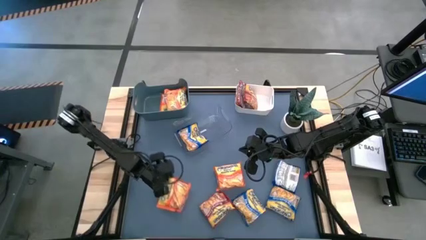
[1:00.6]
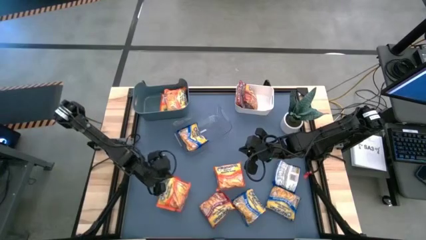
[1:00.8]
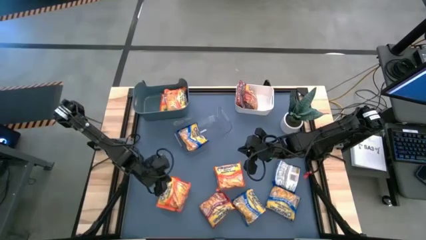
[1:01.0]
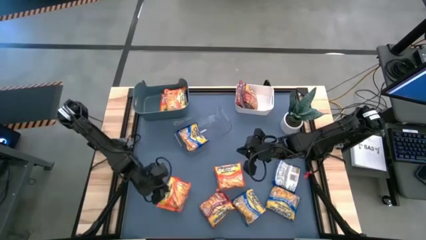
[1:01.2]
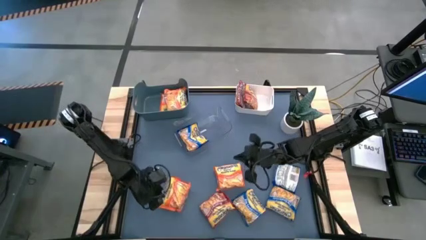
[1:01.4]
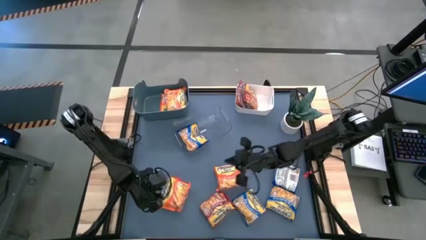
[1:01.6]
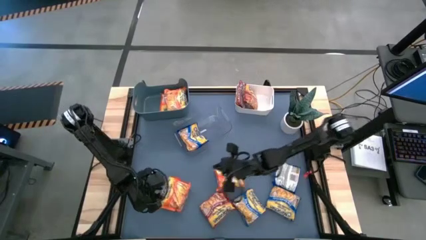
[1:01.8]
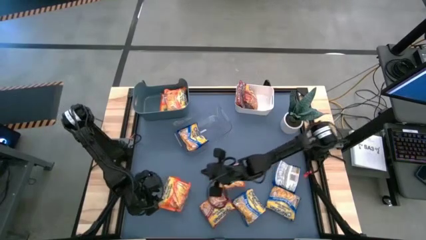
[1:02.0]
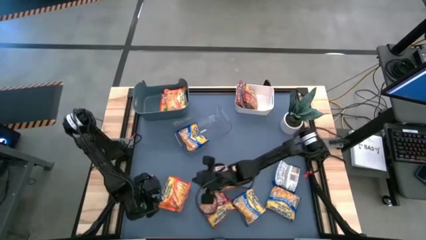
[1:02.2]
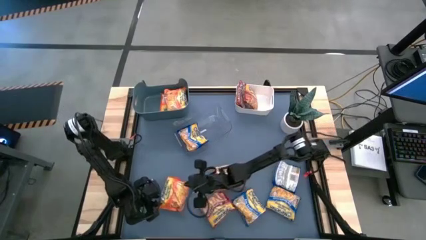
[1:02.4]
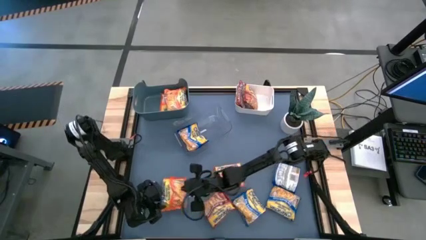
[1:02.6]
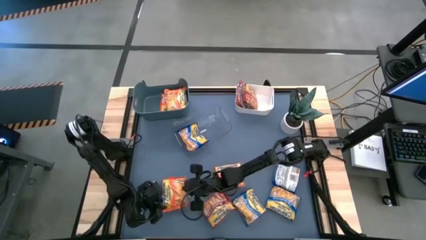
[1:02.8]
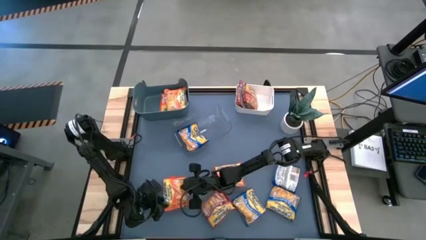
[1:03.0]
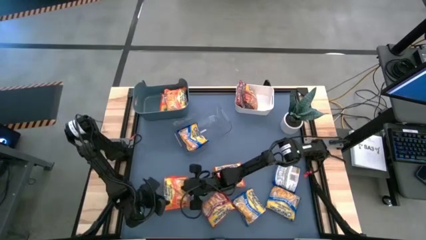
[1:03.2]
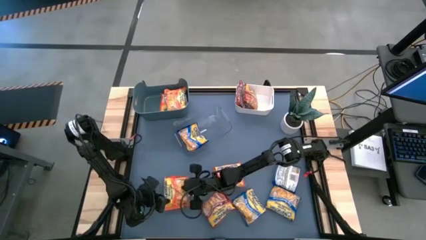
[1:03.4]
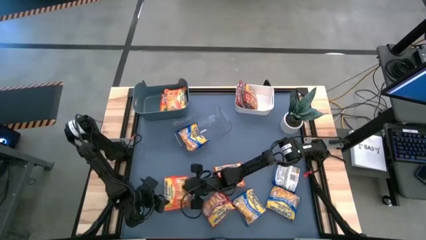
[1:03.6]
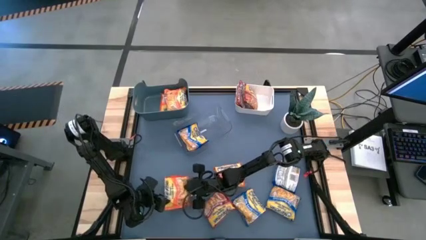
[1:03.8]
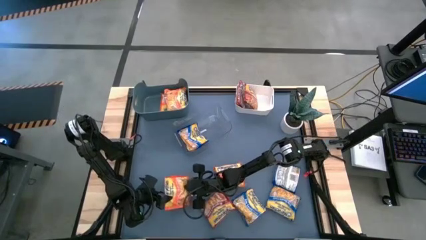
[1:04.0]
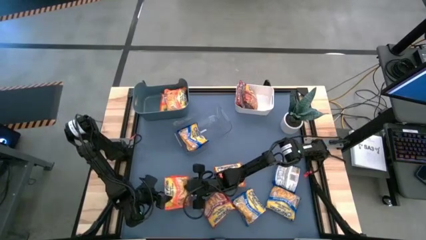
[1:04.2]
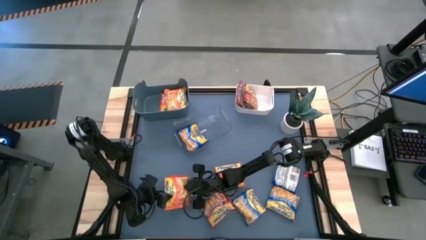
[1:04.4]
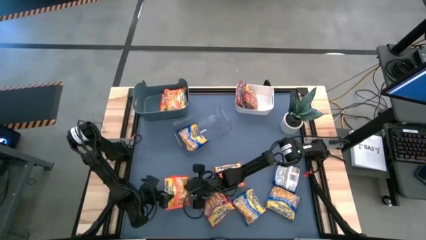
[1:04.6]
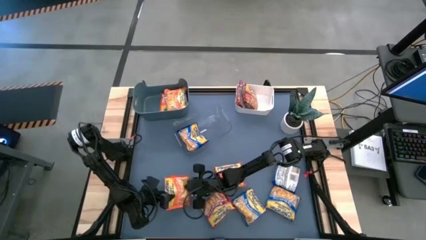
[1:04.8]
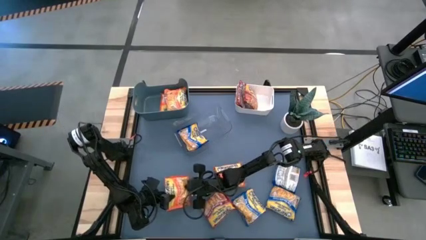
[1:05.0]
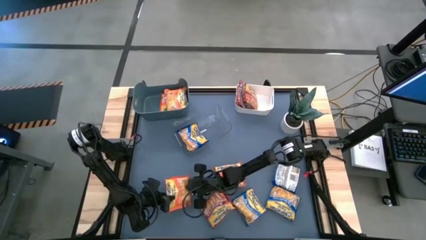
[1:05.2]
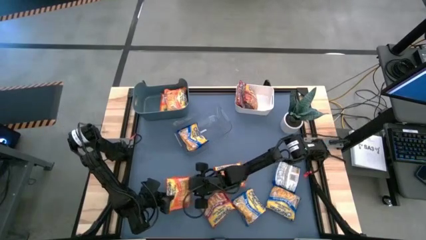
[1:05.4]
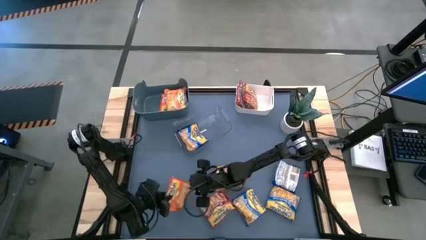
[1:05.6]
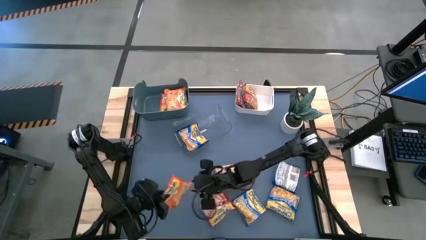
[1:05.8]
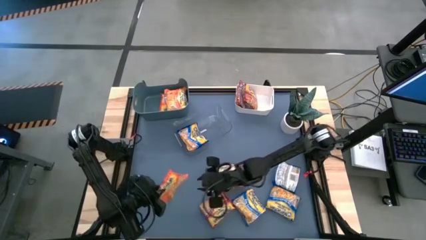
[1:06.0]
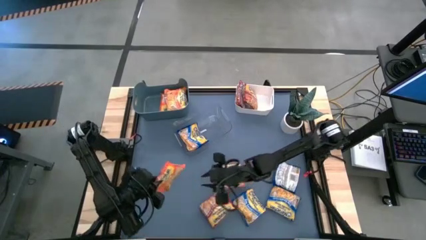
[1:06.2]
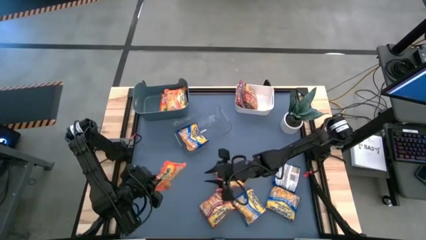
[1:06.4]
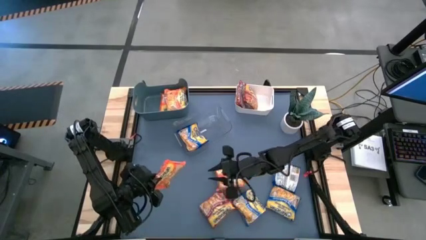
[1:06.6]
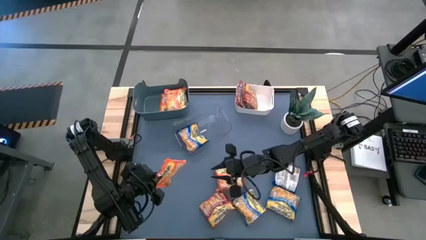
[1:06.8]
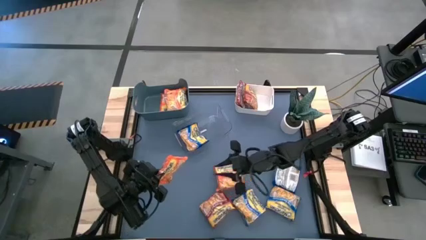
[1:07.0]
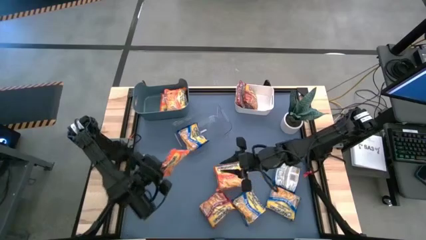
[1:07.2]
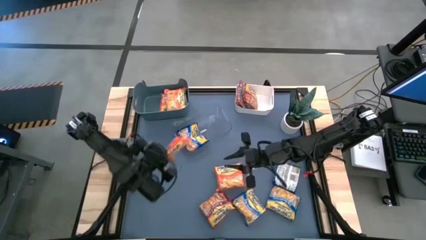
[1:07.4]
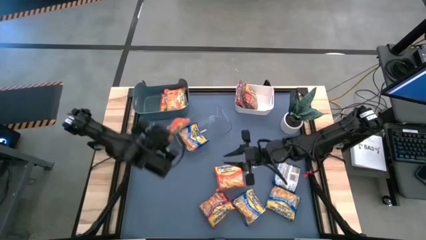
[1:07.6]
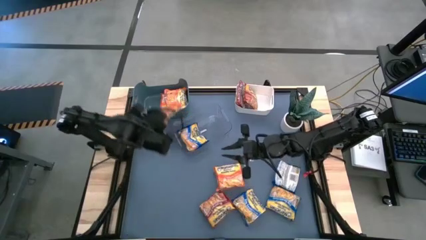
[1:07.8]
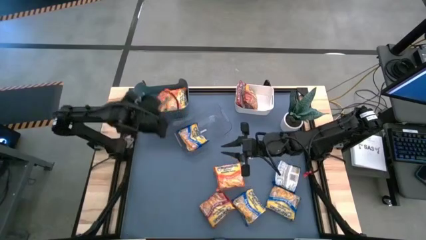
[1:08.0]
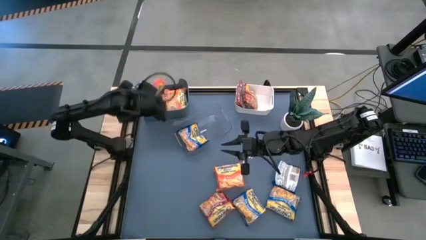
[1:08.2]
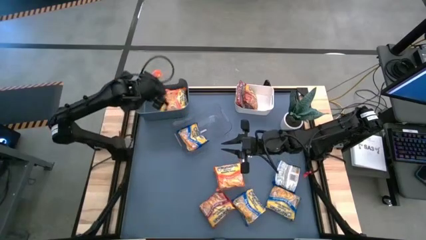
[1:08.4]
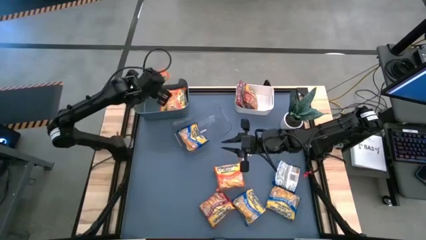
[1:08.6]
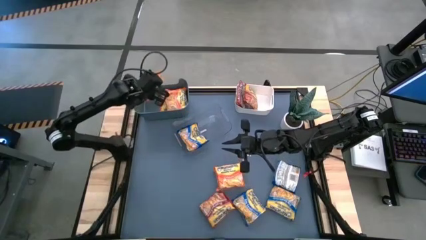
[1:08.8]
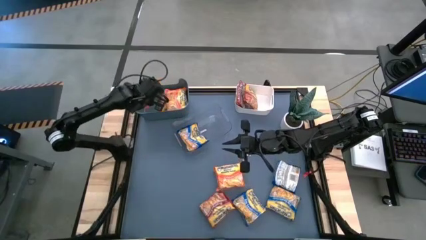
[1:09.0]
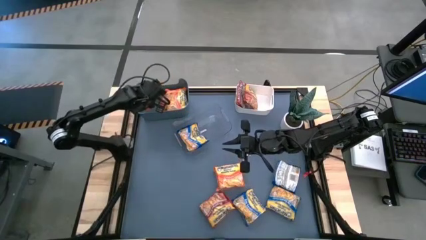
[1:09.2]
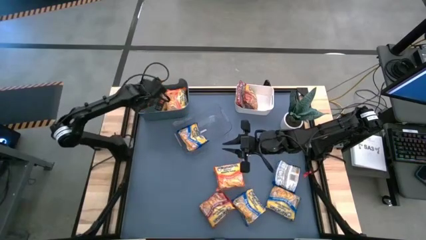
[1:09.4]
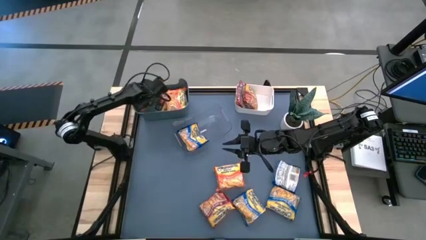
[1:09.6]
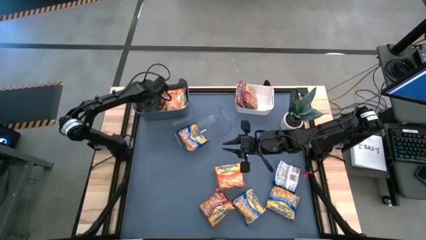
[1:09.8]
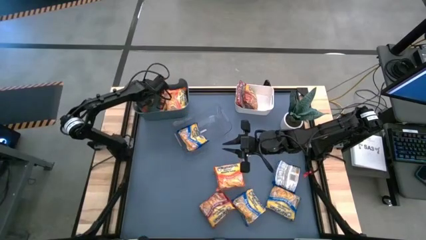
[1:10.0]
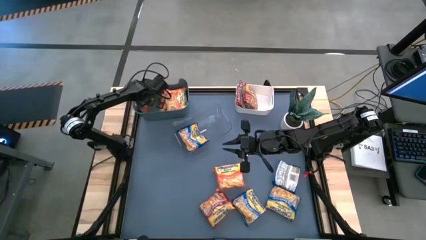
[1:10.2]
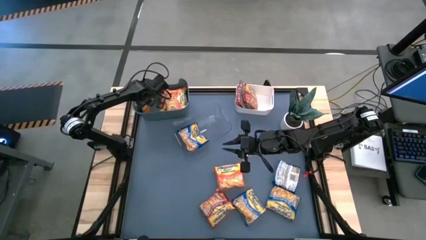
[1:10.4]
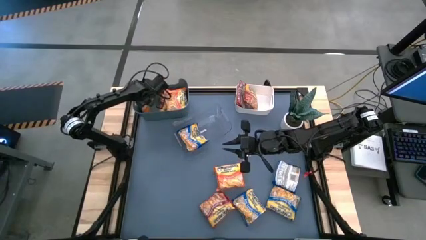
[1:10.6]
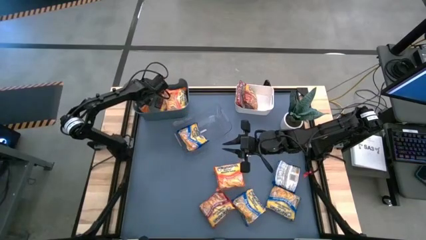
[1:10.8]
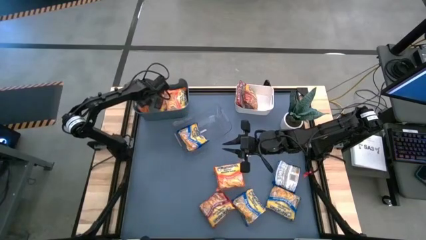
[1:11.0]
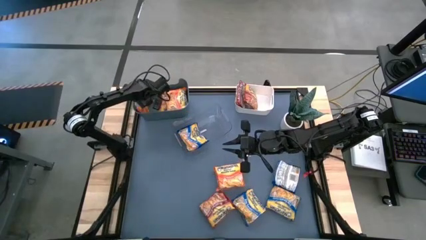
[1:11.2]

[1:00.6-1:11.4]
Task: Sort Maruchan noodles
Put the orange noodle pack into the blue bin

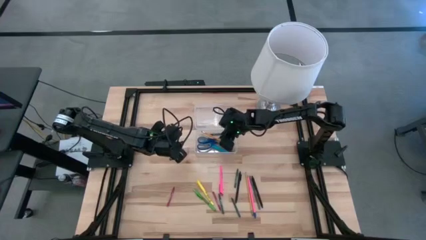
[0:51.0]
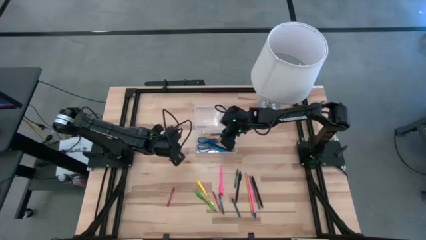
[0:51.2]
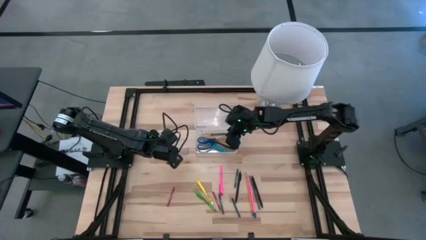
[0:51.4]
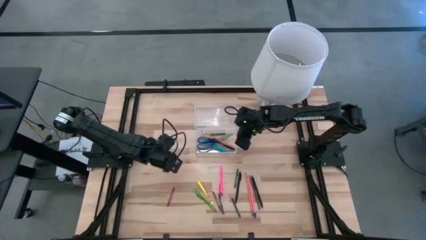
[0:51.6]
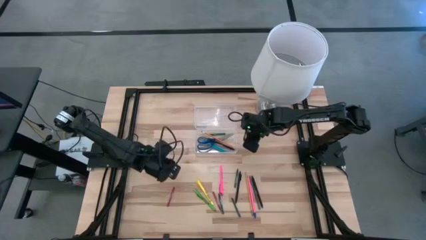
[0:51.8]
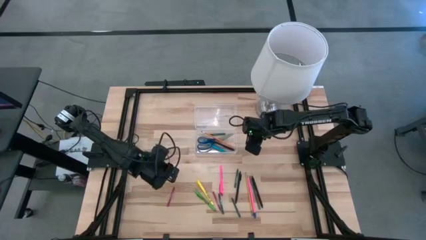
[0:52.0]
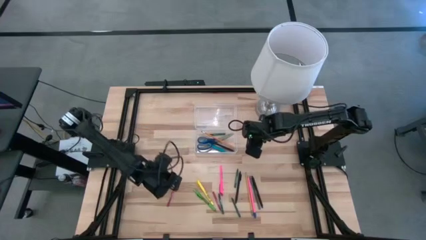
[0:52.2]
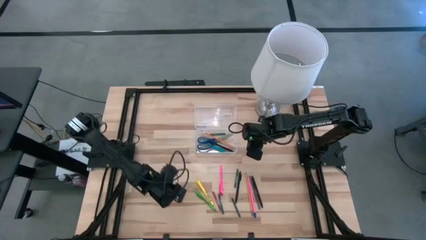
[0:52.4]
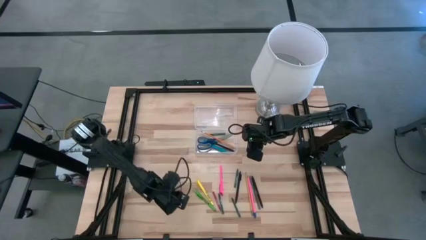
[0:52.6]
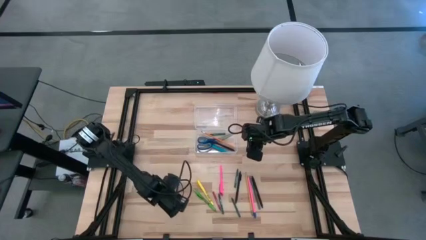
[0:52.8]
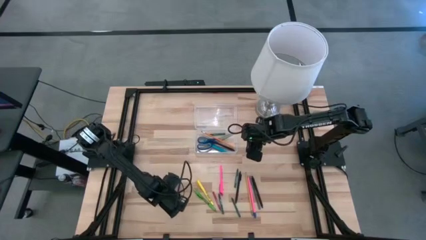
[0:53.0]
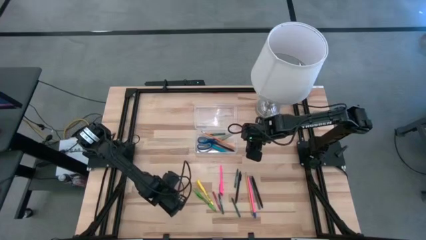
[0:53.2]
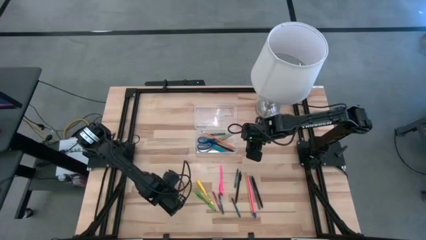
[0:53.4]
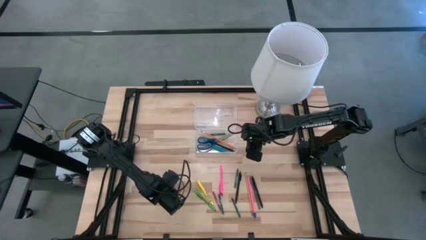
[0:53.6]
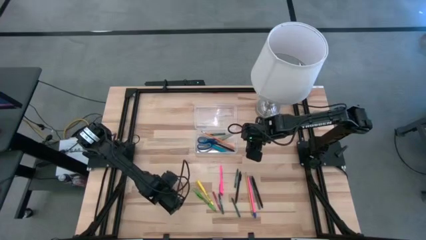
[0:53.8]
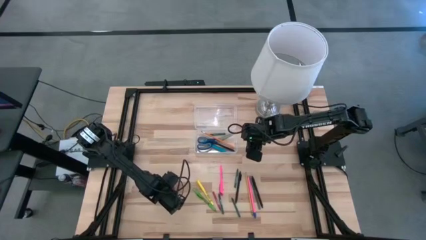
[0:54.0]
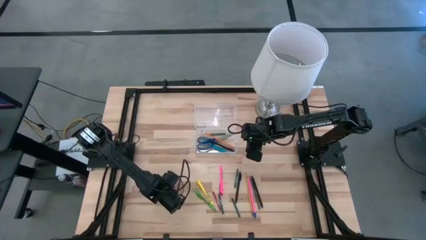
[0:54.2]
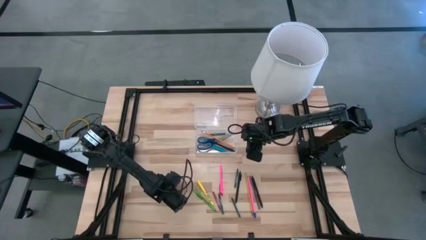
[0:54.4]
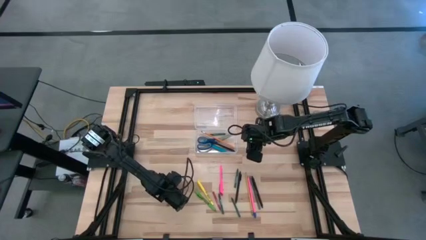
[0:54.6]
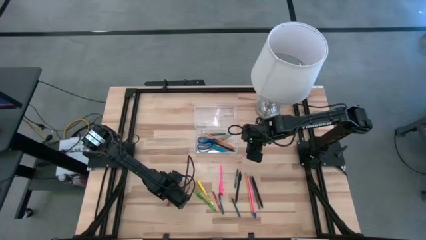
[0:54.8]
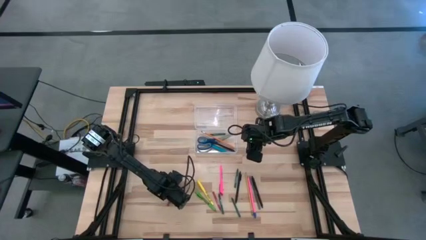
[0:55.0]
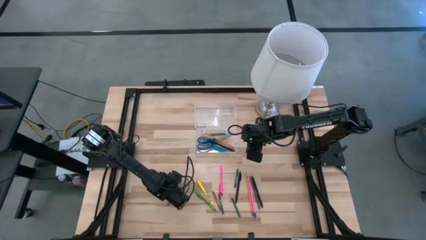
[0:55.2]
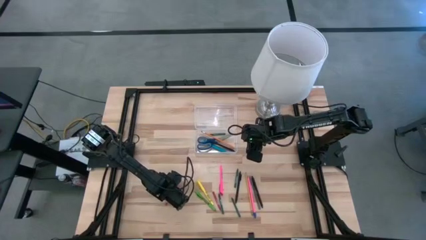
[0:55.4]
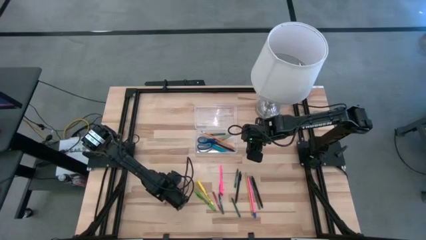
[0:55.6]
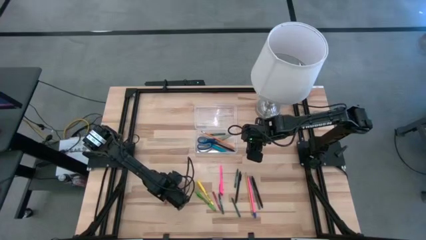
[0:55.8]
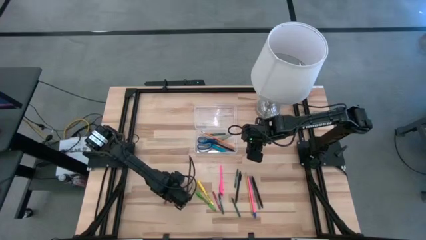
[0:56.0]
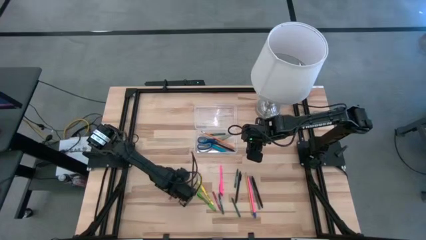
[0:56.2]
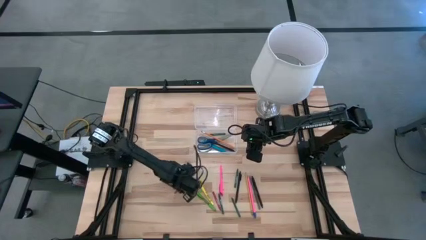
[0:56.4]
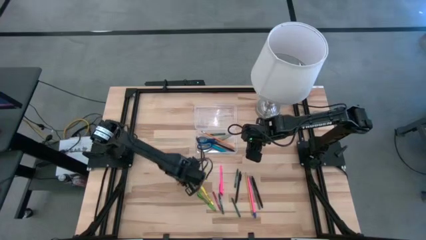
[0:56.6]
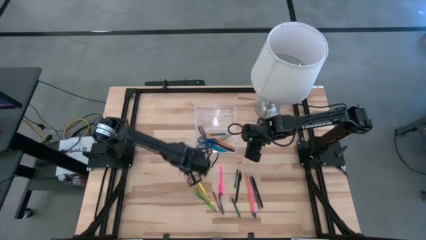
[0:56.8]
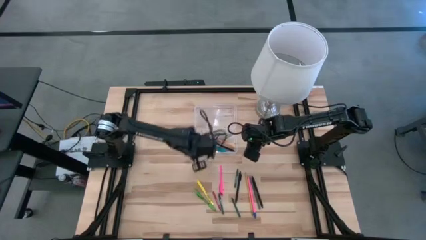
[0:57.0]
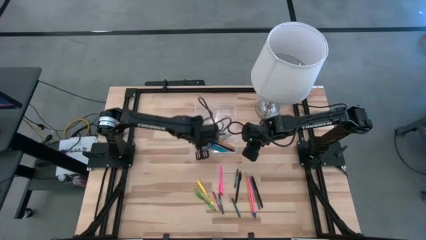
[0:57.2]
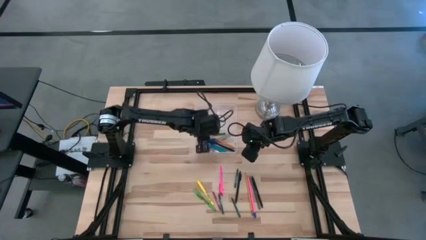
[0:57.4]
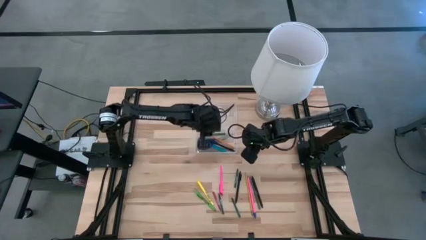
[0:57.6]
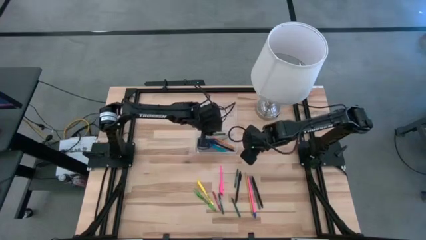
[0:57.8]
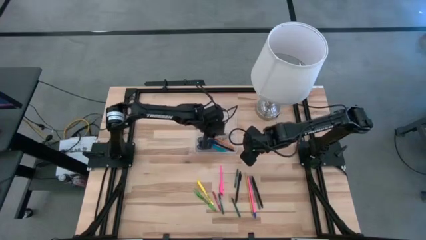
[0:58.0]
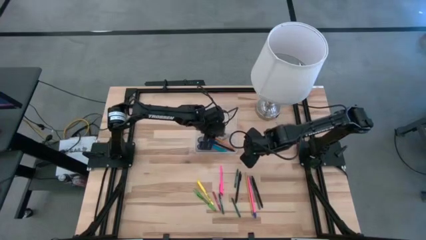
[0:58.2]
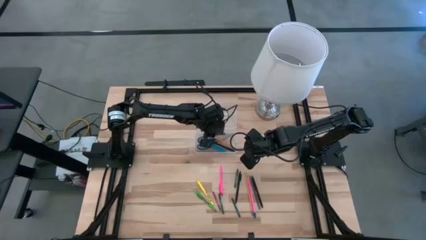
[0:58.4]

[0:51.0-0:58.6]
Task: Pick & place school supplies into a supply box
Put the red crayon into the transparent supply box
